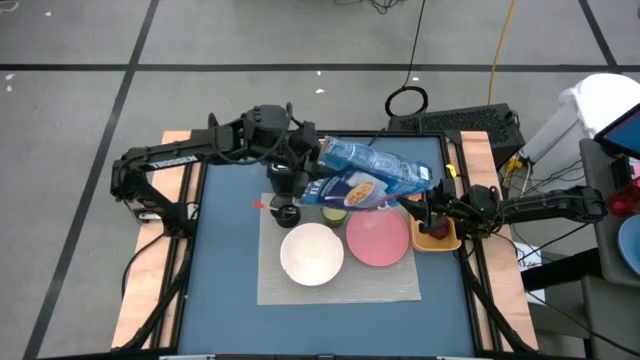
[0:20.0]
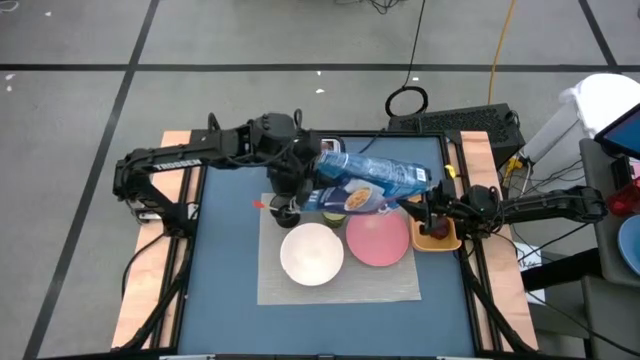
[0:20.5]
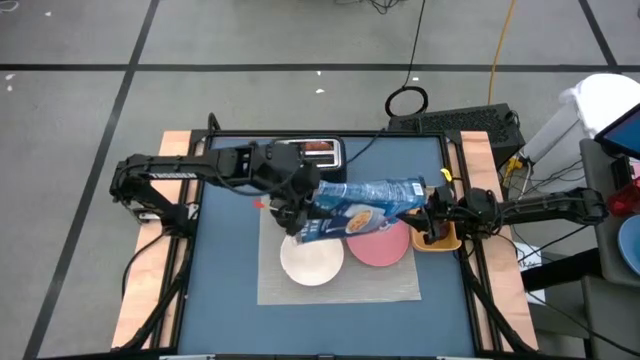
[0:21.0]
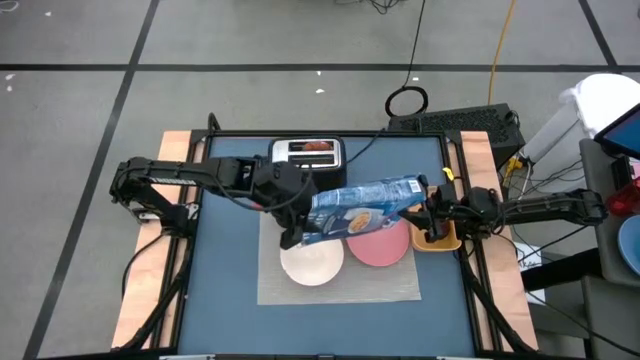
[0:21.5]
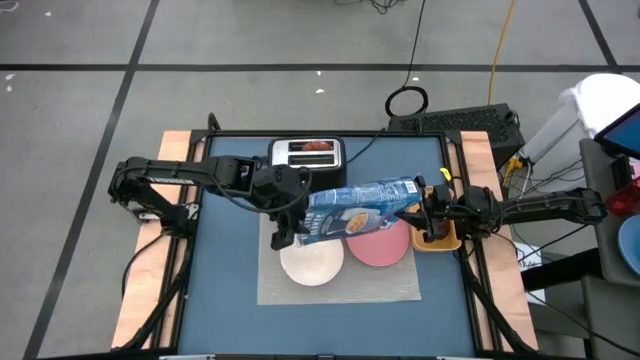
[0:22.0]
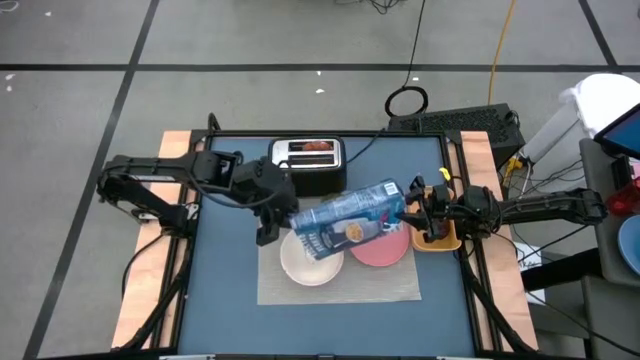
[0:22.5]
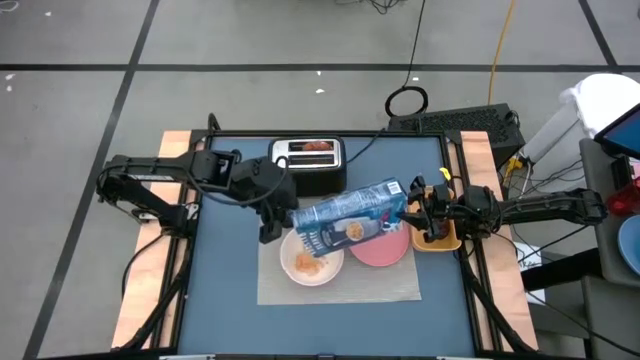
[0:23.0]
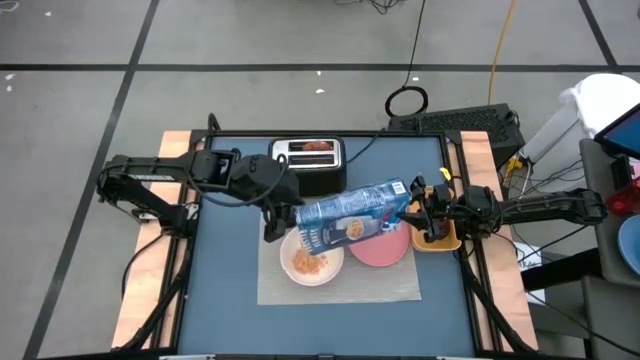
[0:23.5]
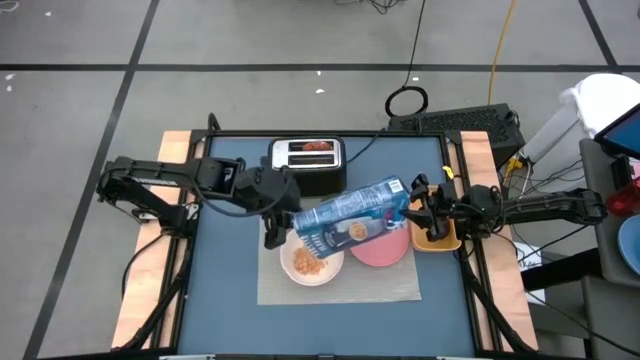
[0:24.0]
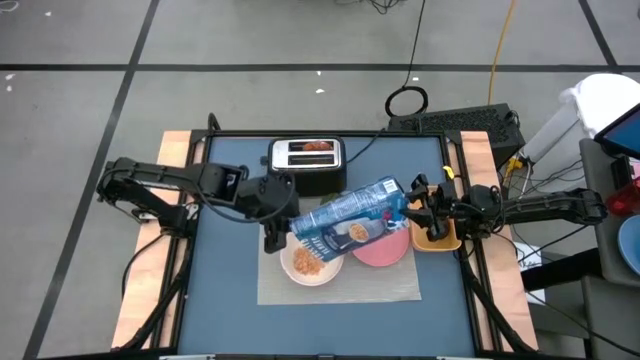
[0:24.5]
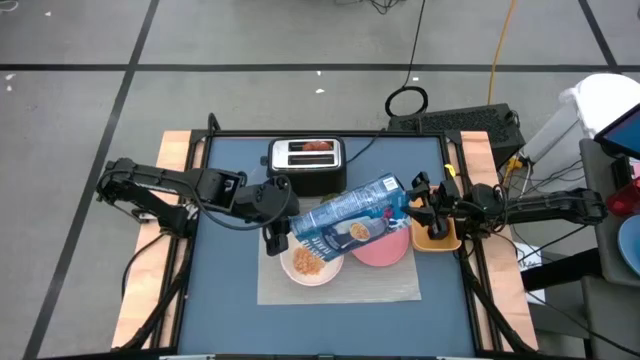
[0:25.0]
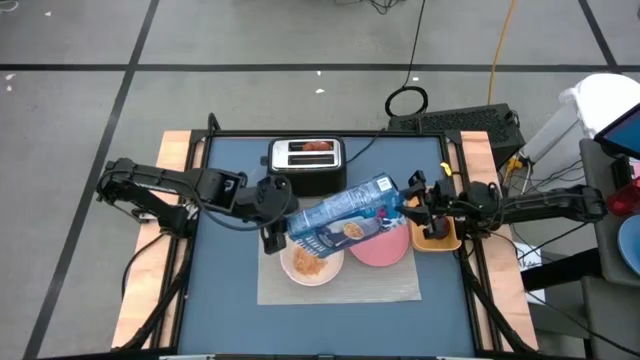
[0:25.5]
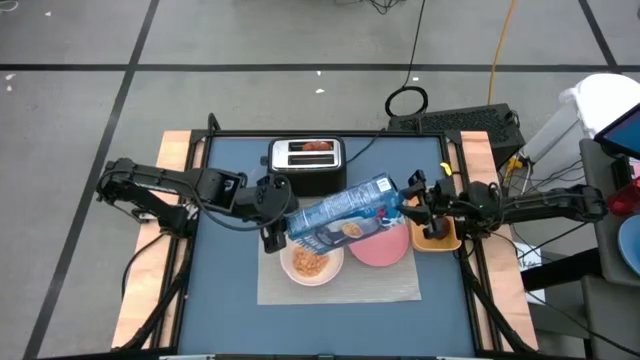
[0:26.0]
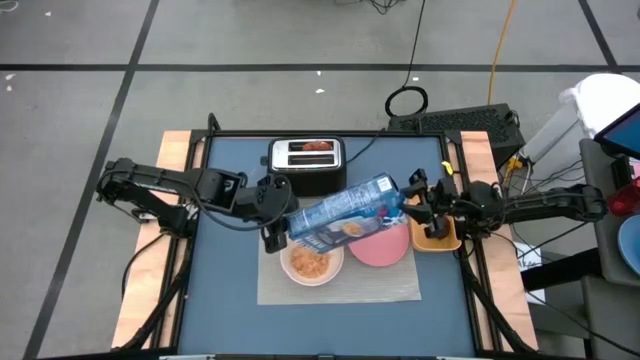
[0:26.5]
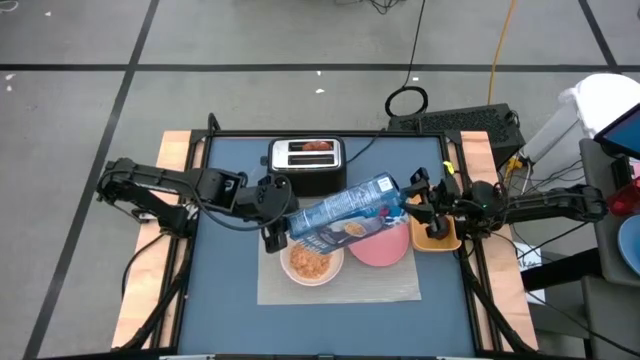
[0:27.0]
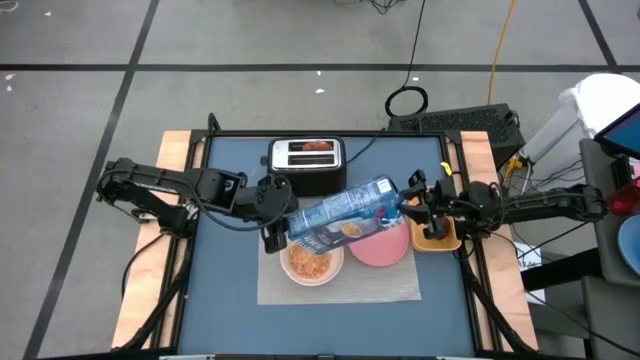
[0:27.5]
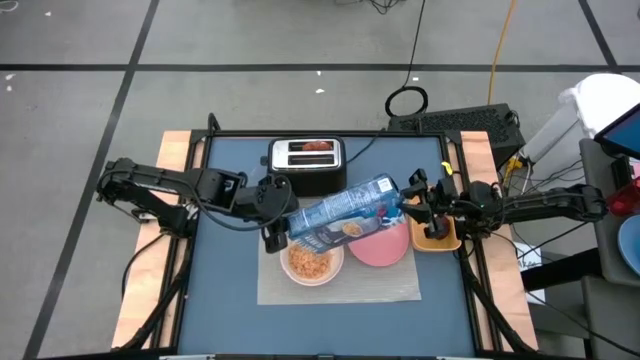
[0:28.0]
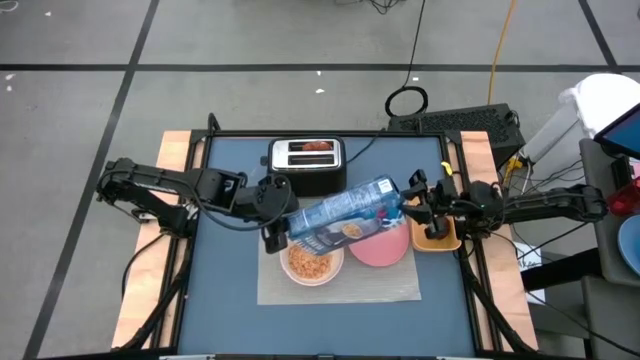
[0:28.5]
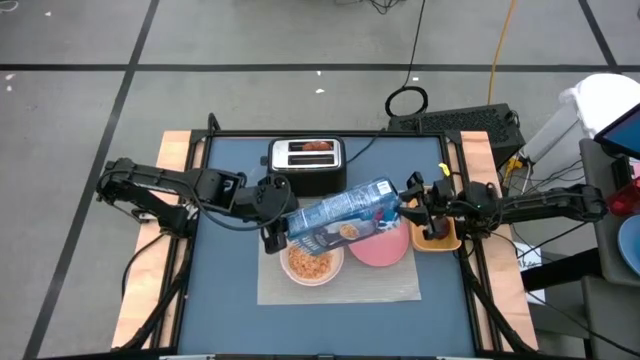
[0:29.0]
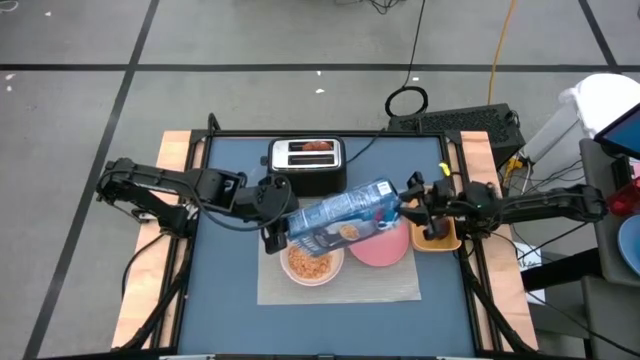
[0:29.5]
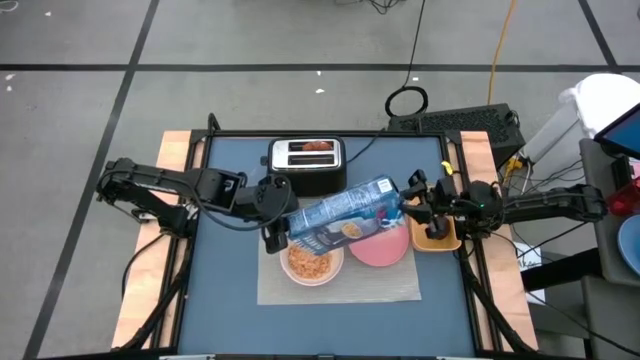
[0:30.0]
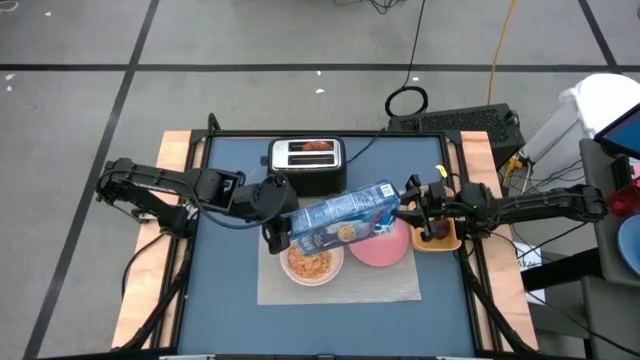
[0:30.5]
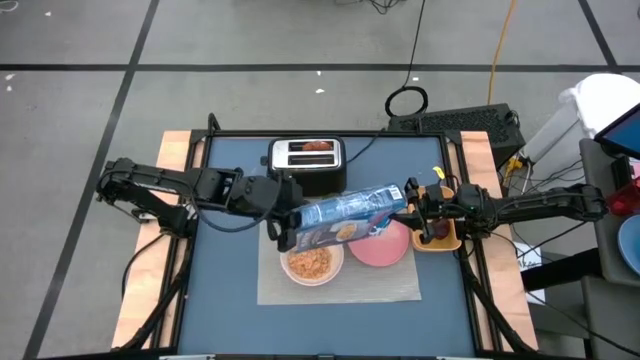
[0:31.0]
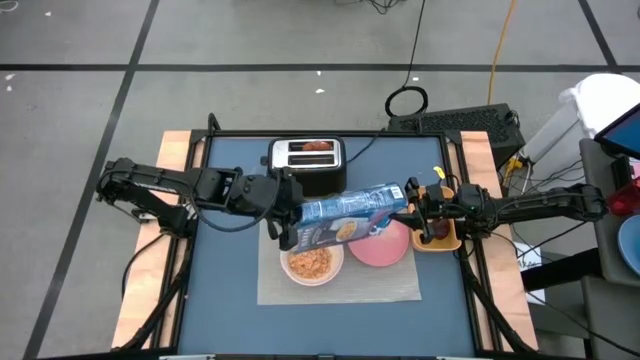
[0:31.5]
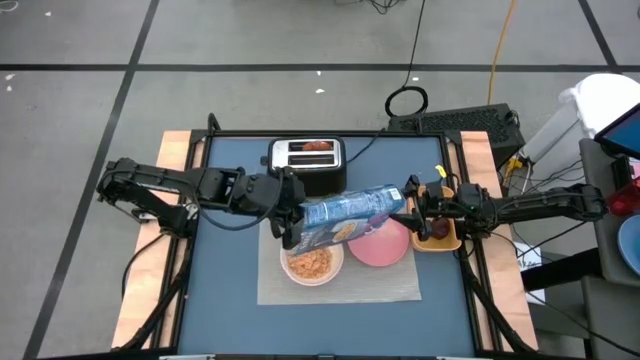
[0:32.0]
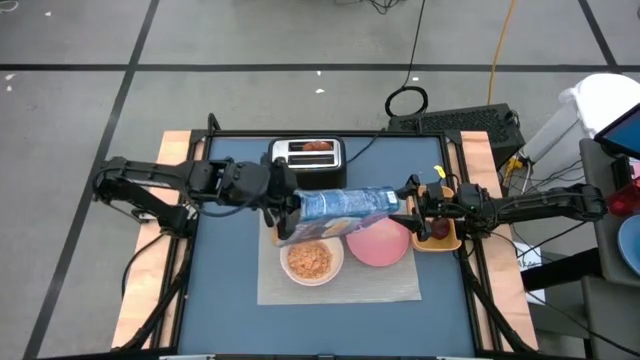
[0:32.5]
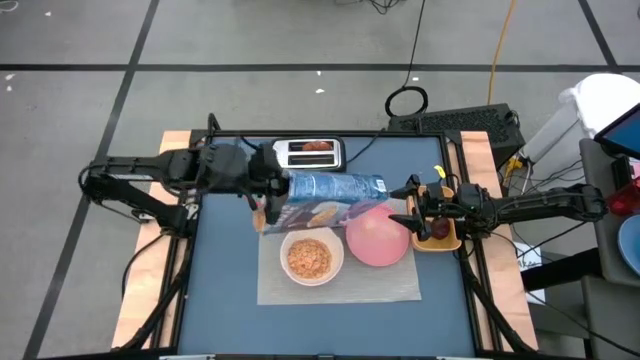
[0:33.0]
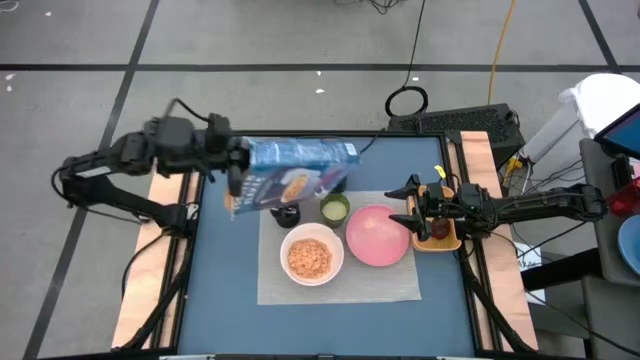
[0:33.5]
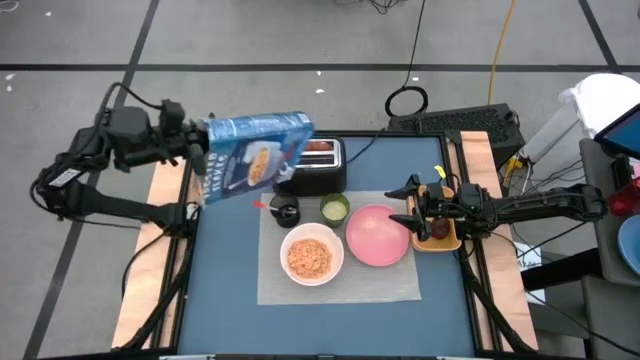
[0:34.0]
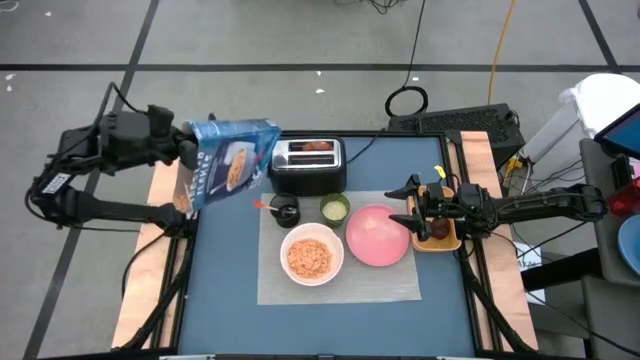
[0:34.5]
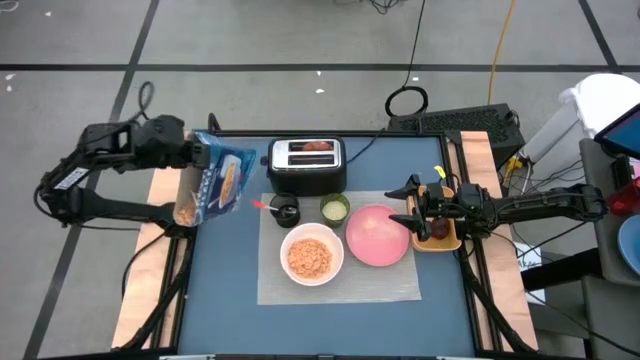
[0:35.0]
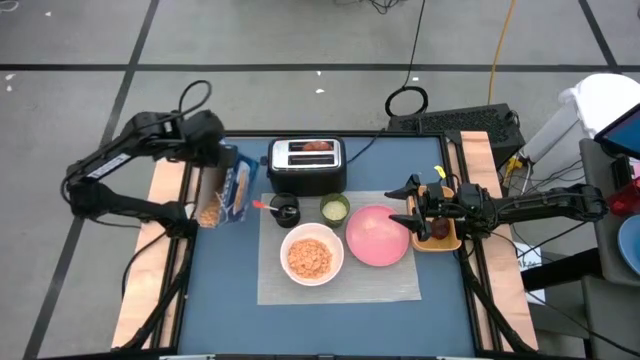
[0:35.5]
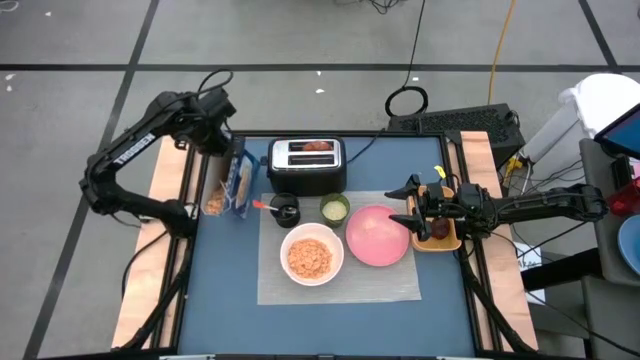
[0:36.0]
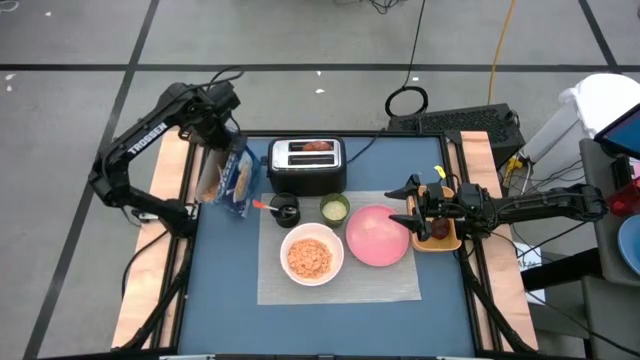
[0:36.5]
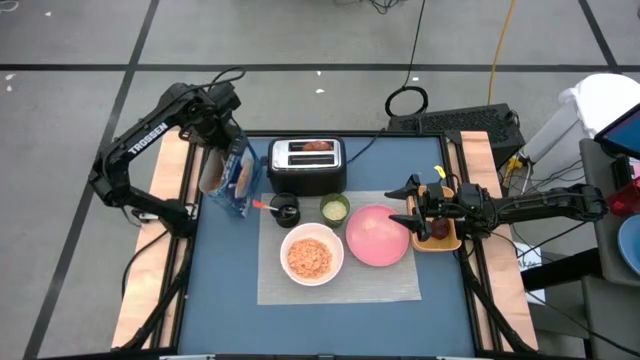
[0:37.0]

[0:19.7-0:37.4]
Task: Arrange a breakfast setting
Pour the cereal from the blue cereal box into the white bowl

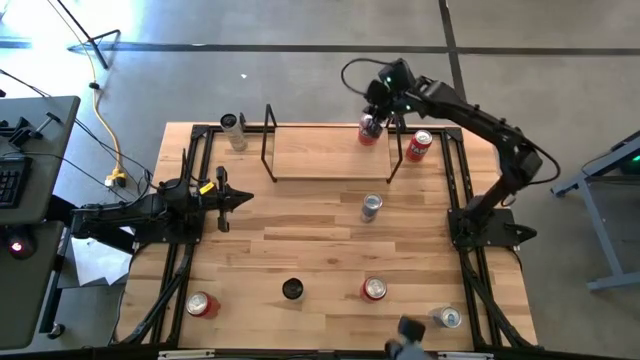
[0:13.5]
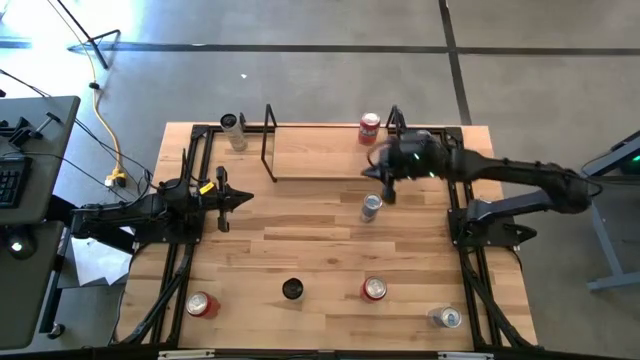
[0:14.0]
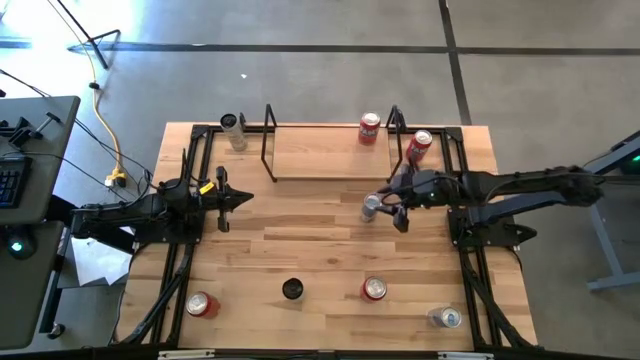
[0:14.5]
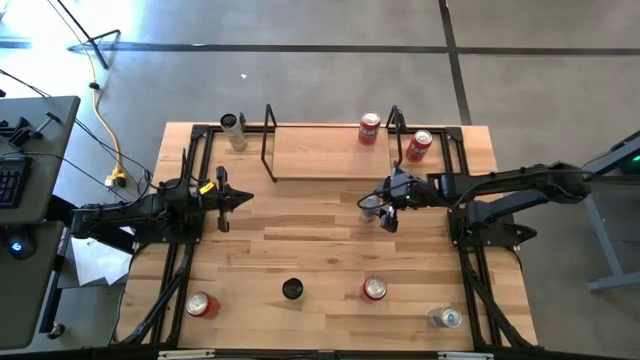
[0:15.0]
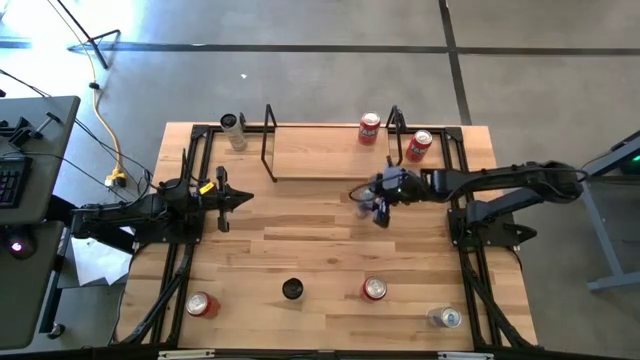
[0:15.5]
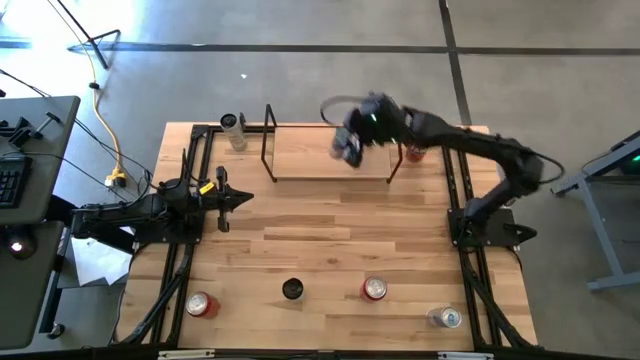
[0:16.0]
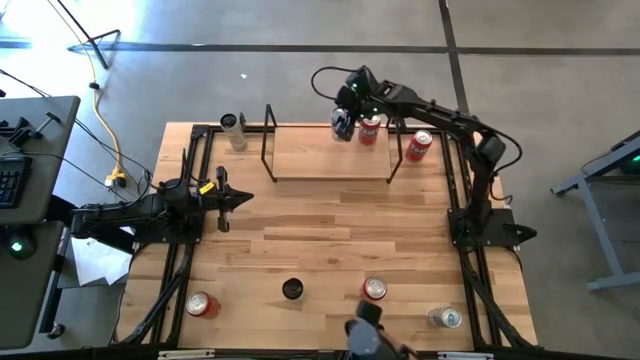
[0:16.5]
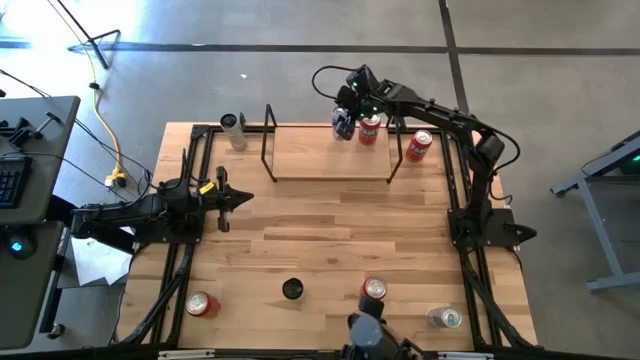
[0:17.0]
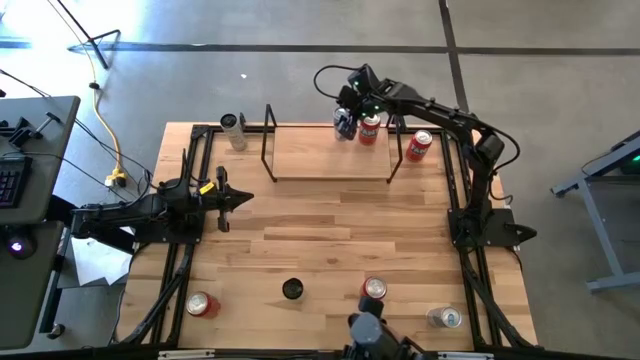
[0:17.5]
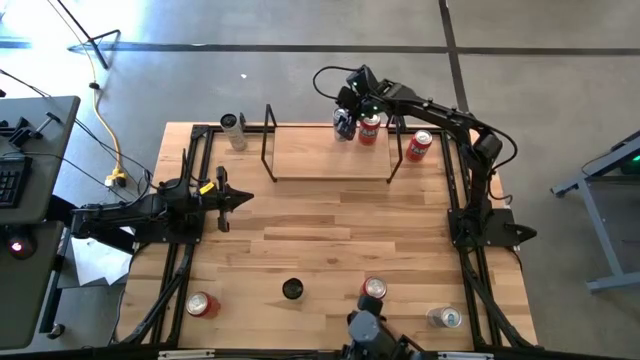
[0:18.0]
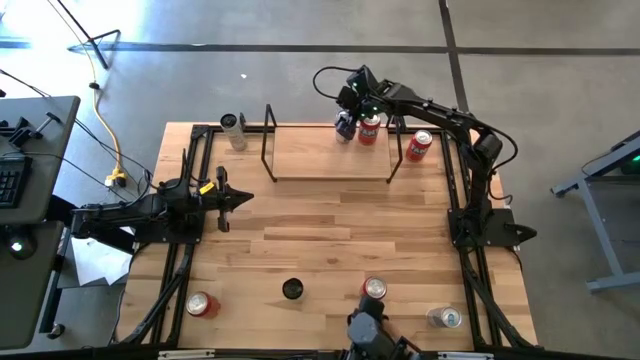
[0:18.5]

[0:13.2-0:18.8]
Task: Place canned beverage on shelf
Put the top blue soda can on the shelf
